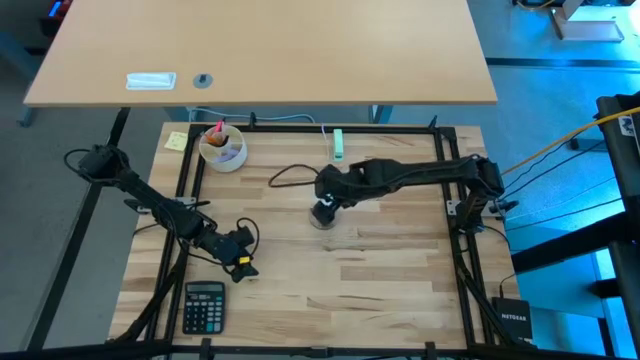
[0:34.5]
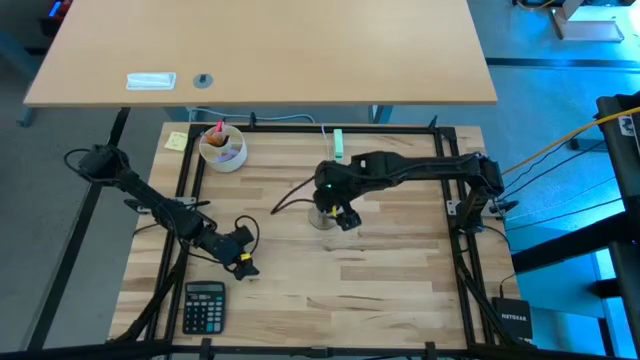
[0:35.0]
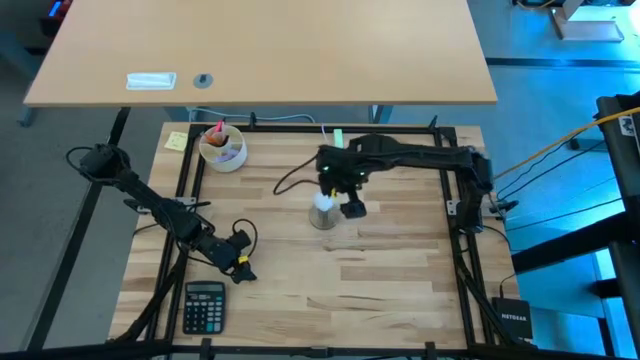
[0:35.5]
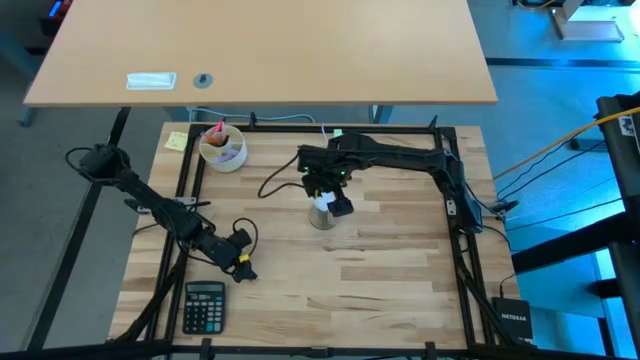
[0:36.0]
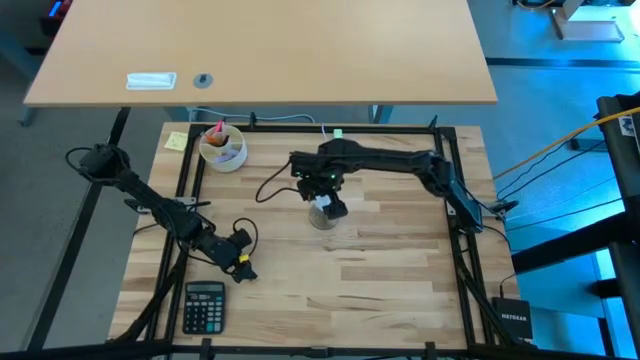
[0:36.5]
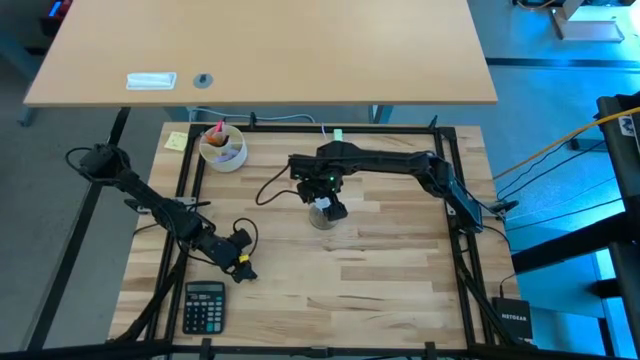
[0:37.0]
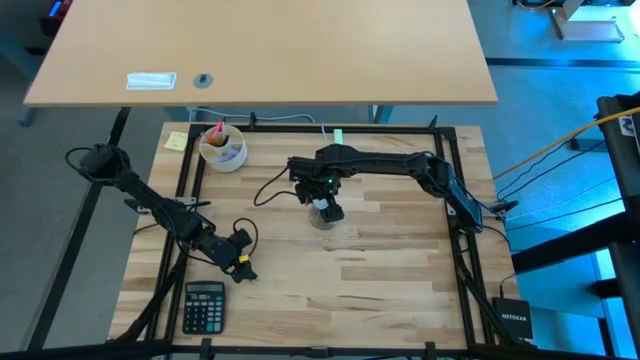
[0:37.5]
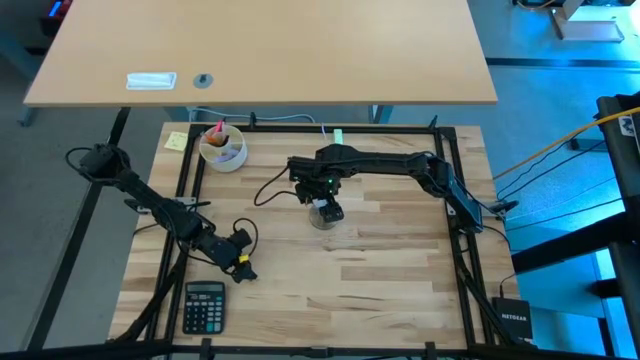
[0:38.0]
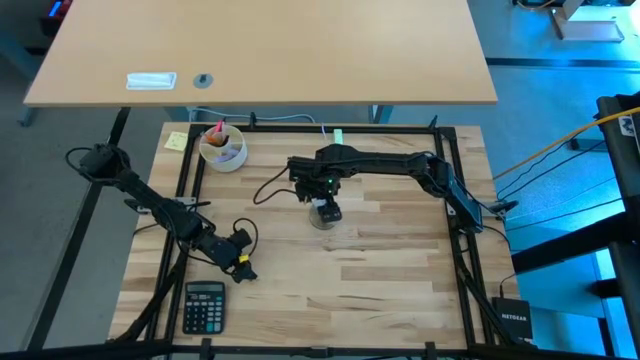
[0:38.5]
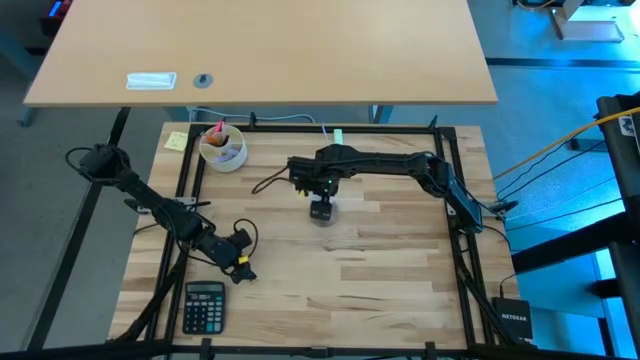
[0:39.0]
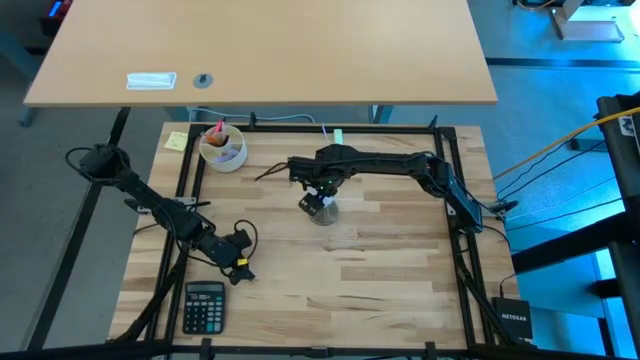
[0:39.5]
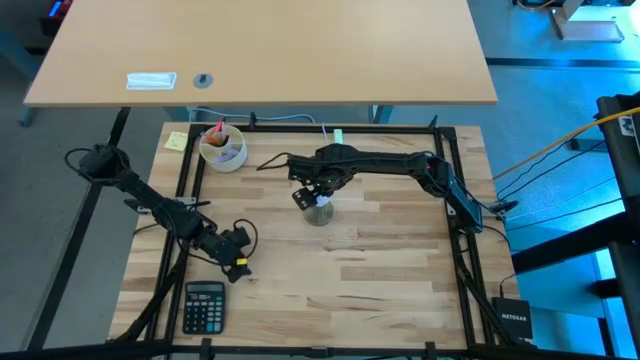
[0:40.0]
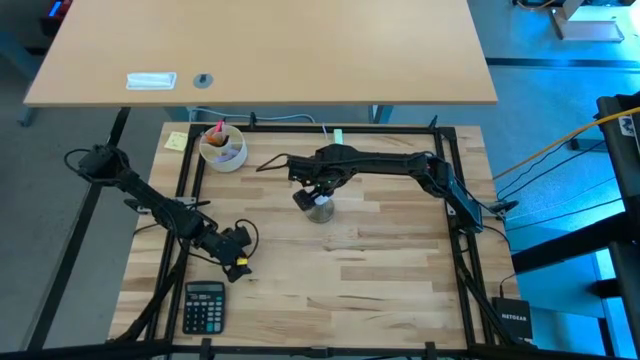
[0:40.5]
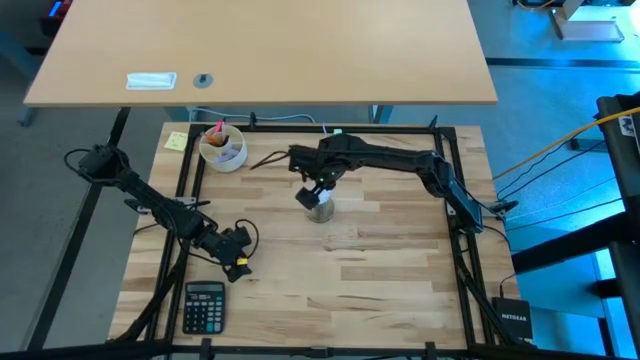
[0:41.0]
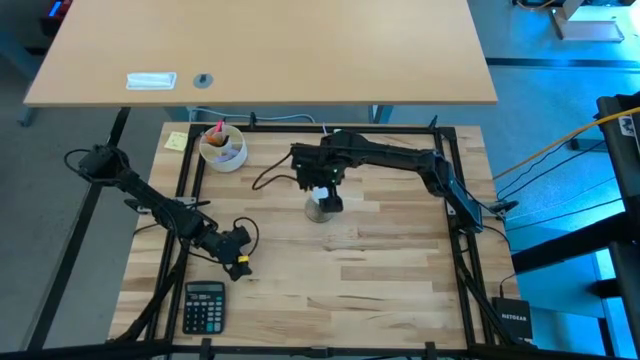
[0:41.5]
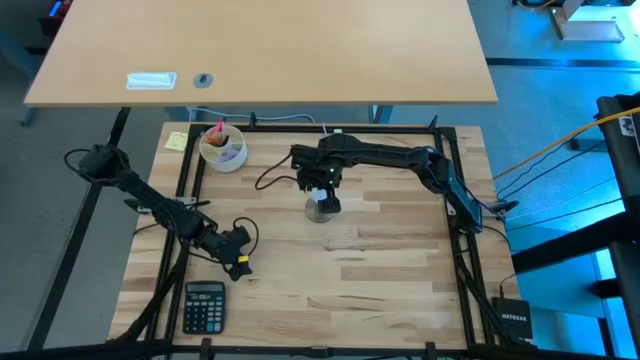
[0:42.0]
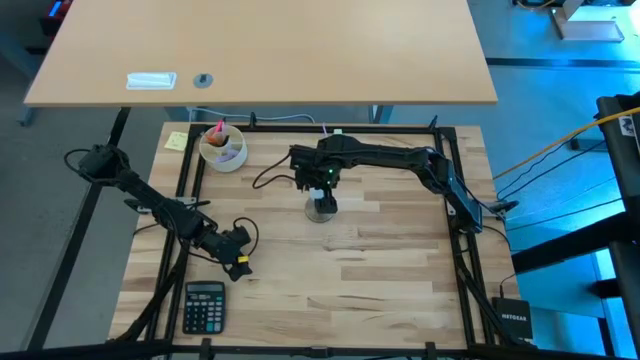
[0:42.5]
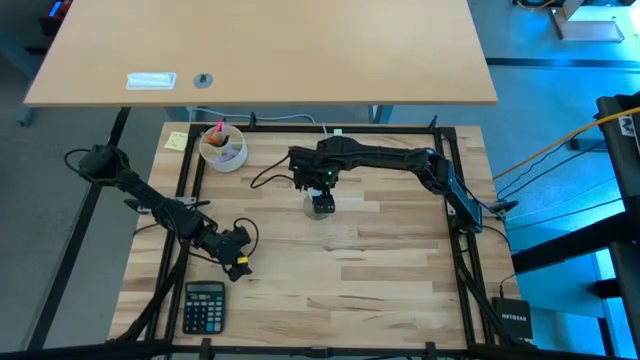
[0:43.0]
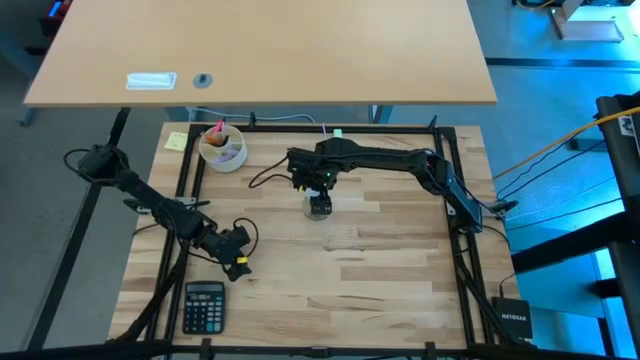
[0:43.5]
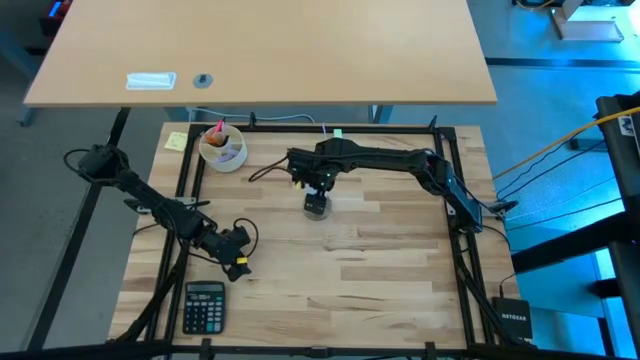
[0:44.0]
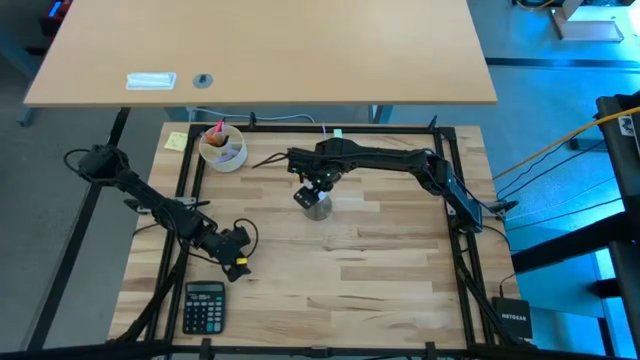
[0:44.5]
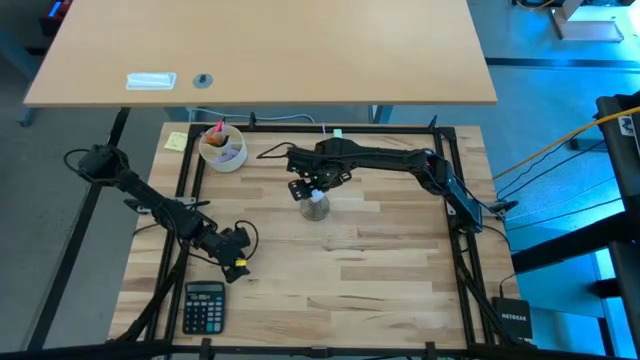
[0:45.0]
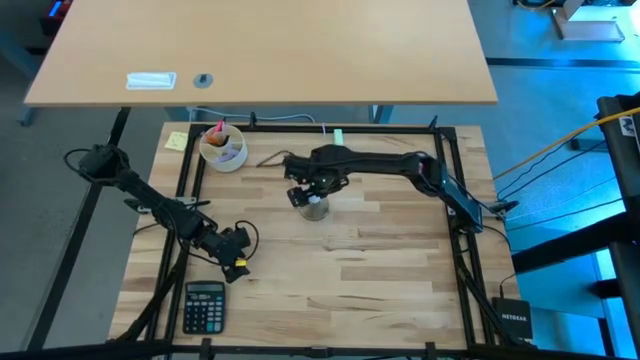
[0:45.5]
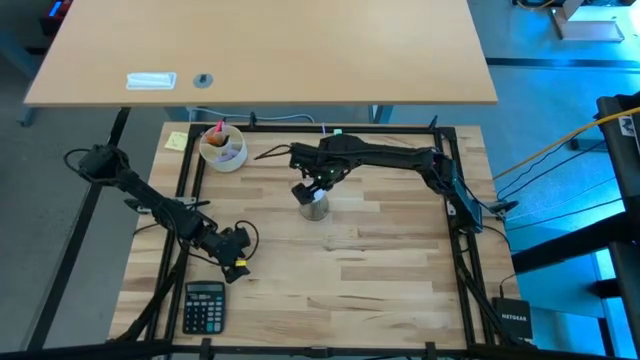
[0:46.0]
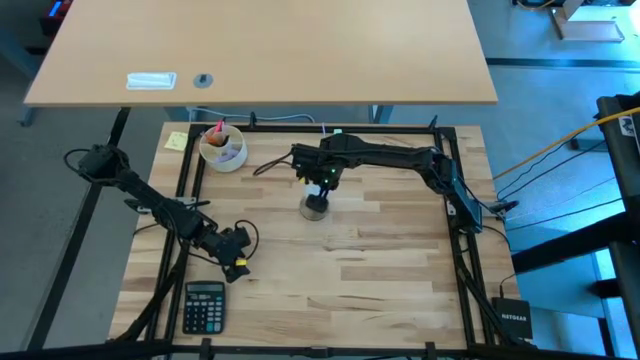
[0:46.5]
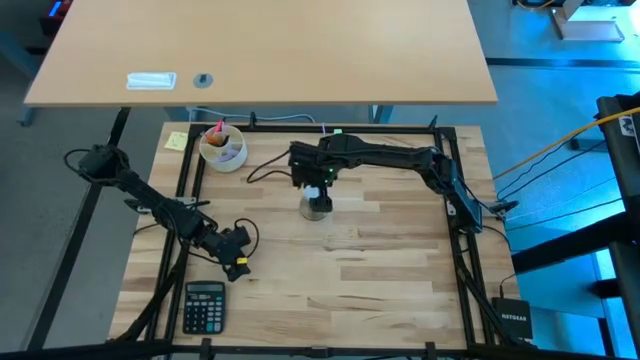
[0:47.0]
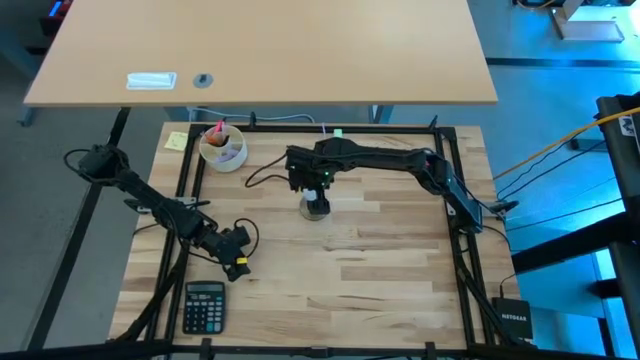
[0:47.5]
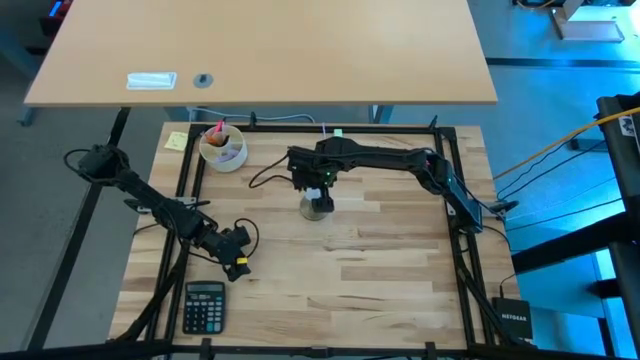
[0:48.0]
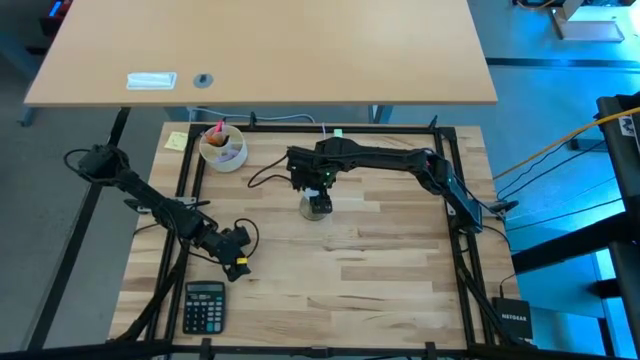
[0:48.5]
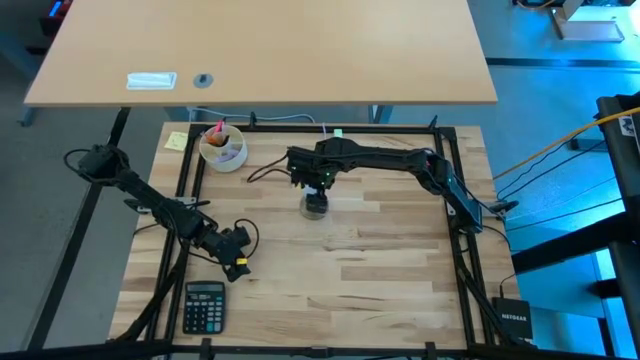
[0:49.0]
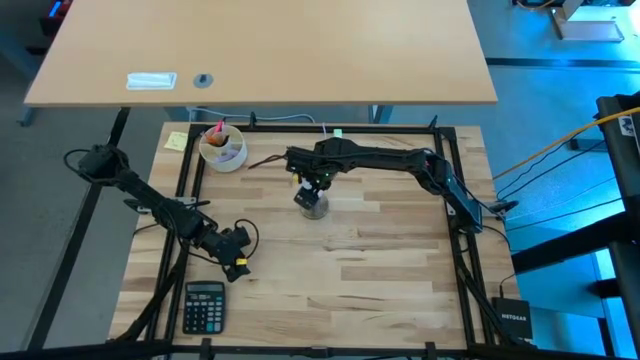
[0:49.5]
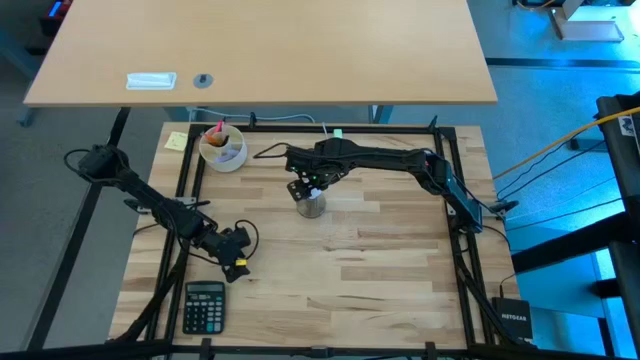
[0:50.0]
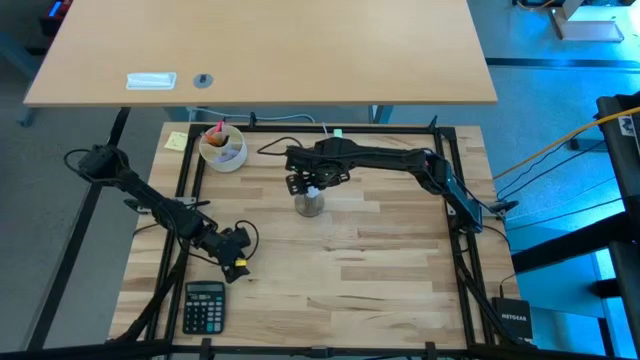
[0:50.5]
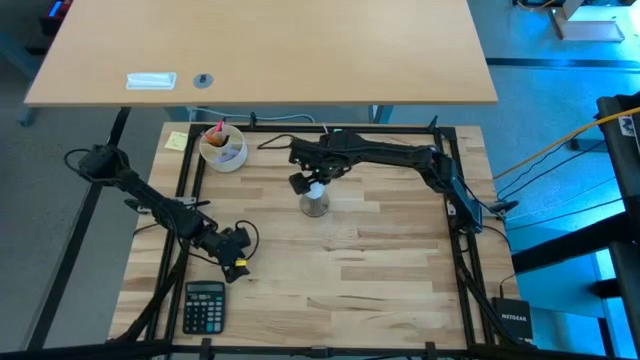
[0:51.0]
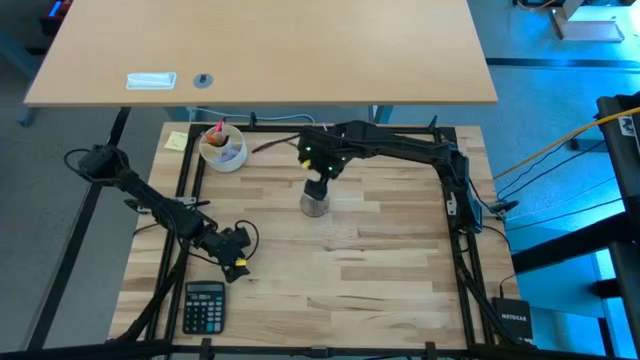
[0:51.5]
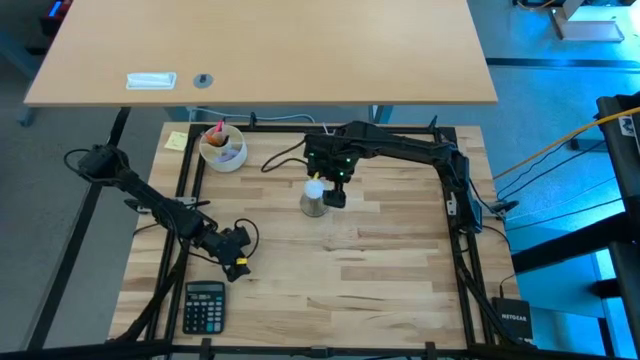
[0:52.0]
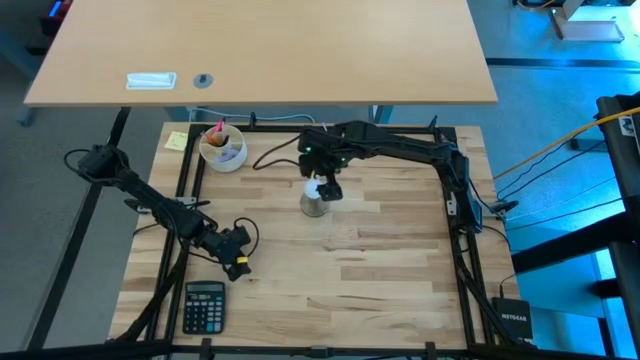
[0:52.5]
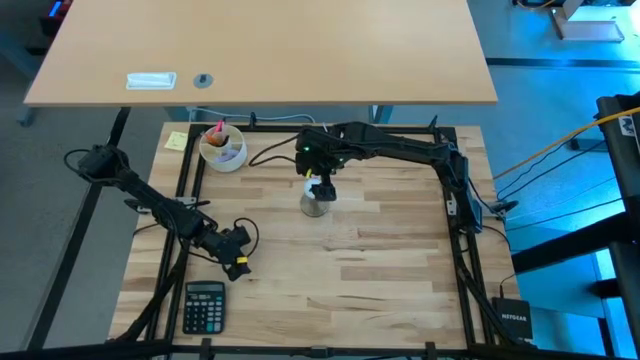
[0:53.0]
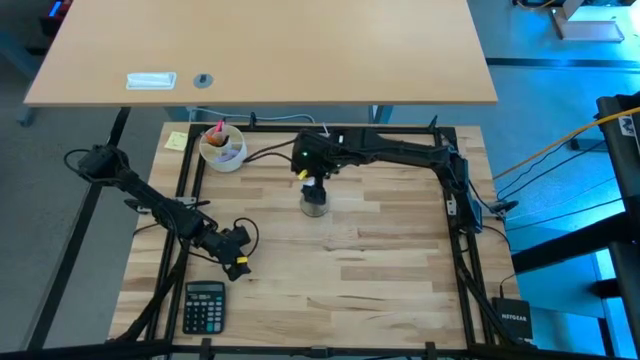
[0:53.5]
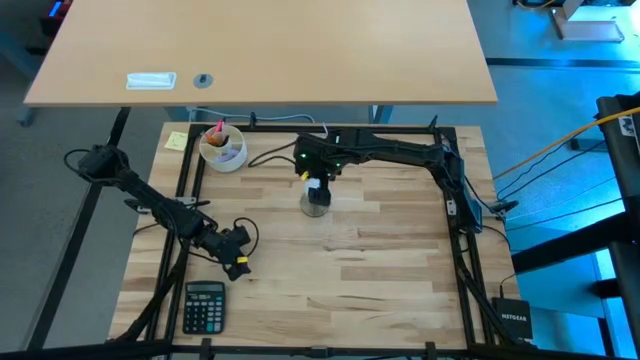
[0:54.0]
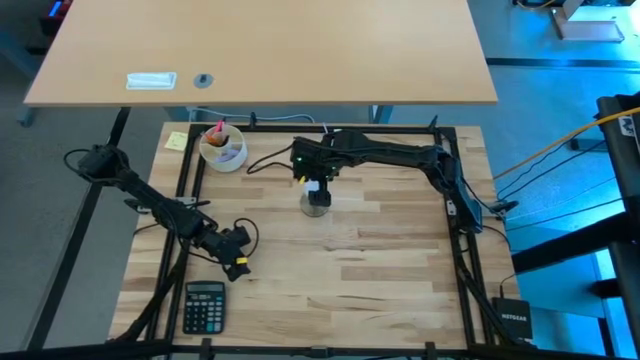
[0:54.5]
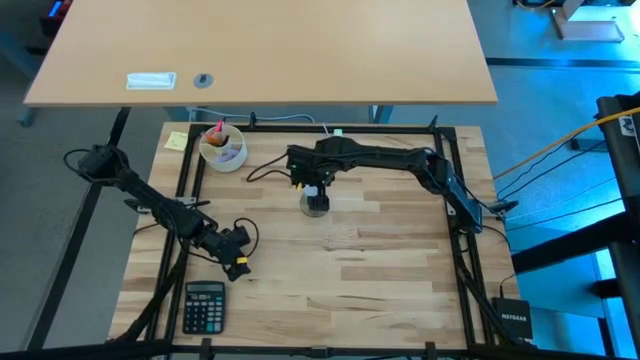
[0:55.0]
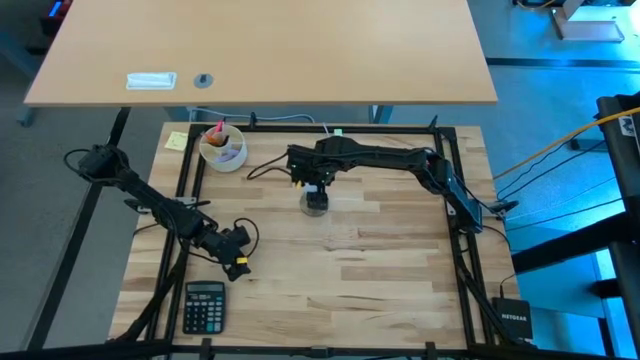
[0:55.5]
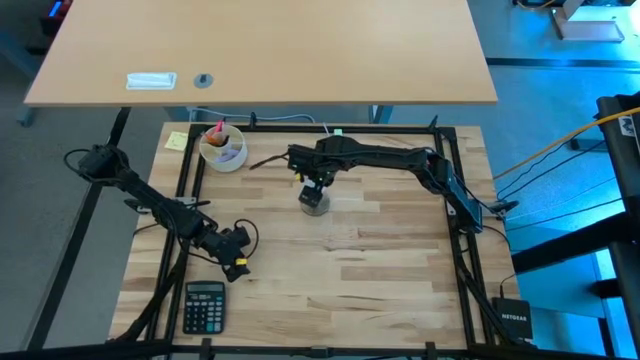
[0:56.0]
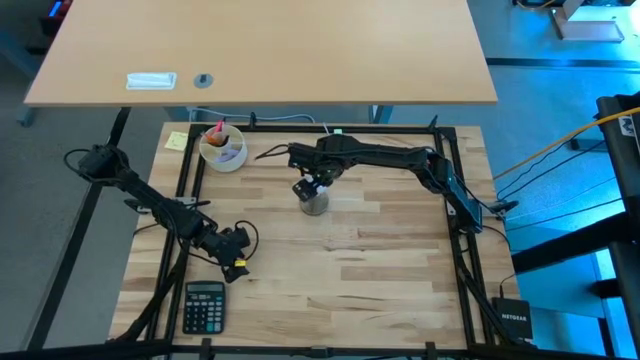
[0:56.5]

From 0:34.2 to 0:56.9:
Task: Screw lightbulb
Insert the lightbulb into the lamp
